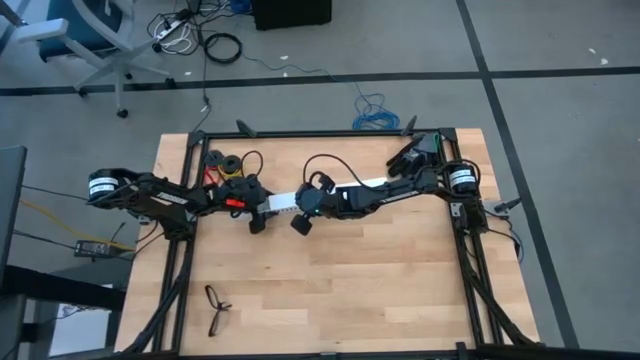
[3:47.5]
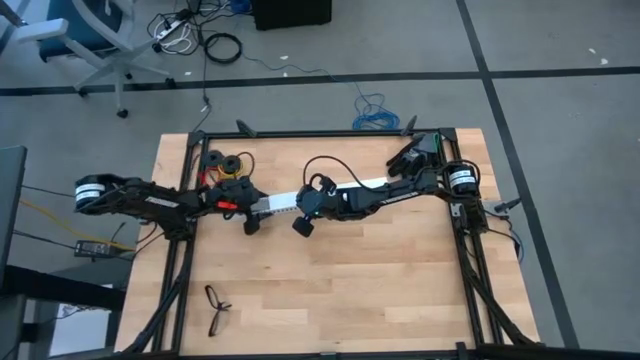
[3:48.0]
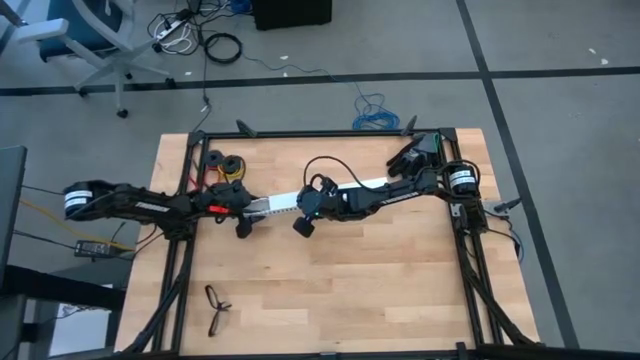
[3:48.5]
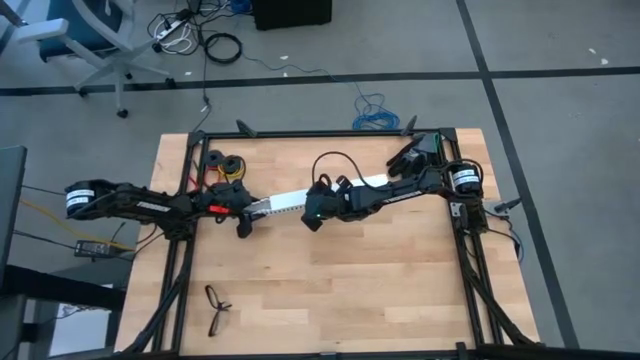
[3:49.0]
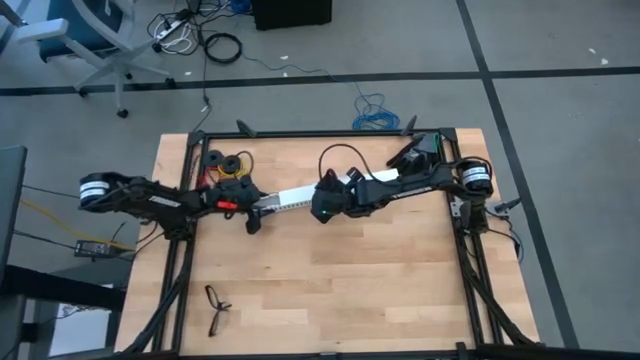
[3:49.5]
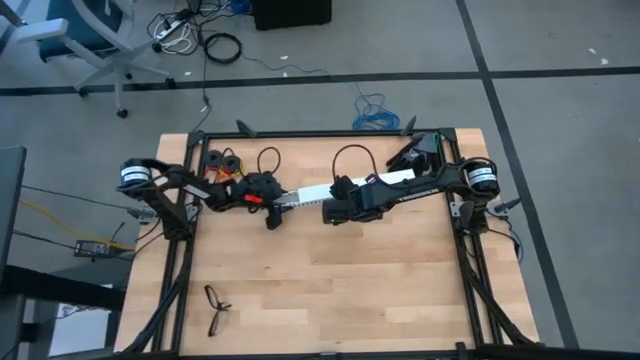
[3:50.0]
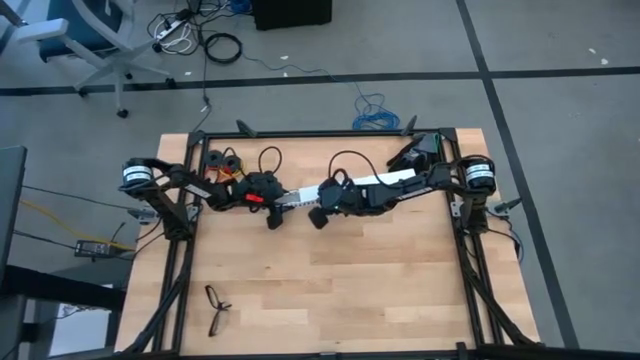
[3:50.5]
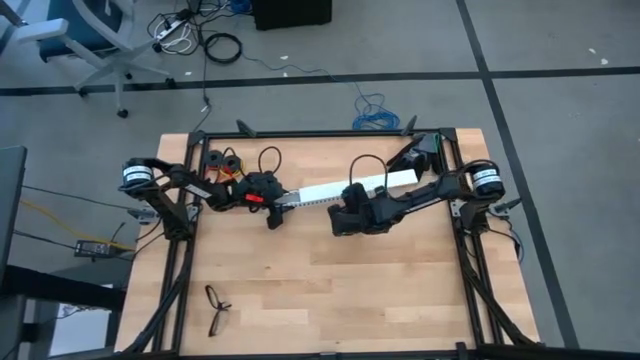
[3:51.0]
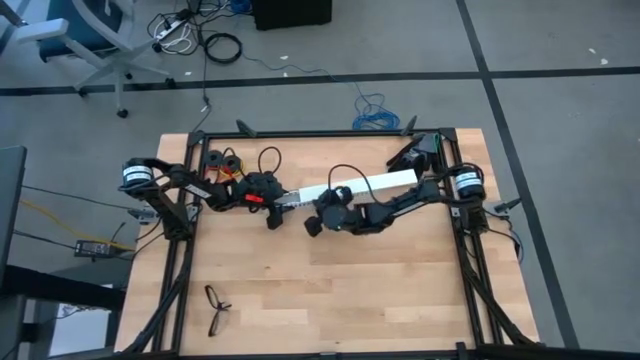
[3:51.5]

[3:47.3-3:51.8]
Task: Ziptie cables
Close the white cable duct

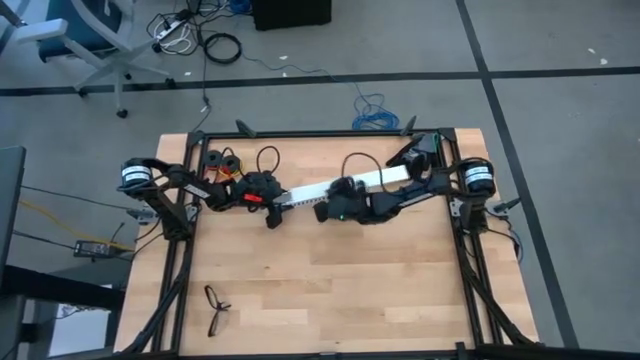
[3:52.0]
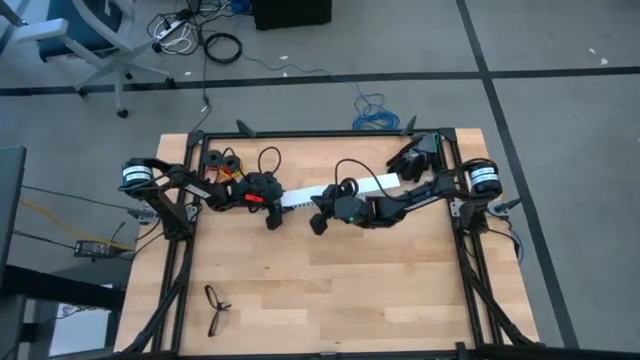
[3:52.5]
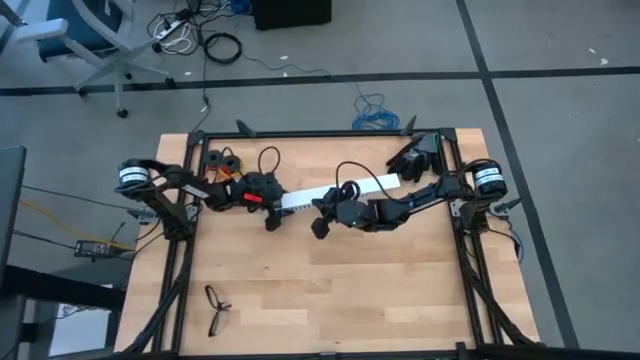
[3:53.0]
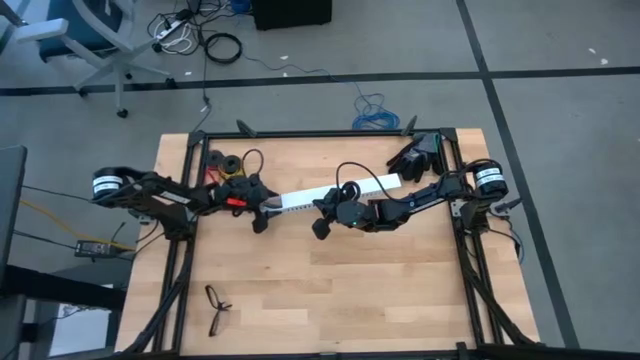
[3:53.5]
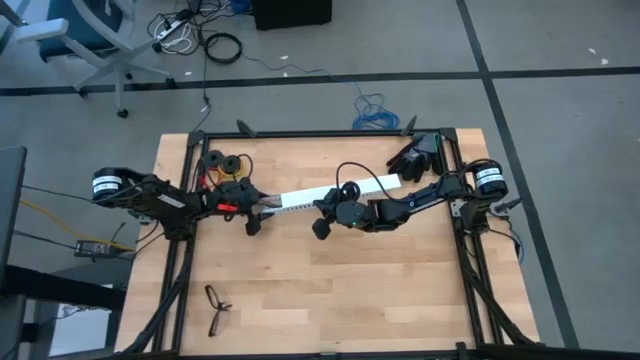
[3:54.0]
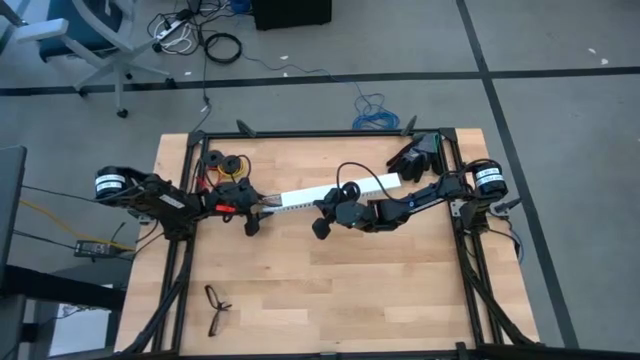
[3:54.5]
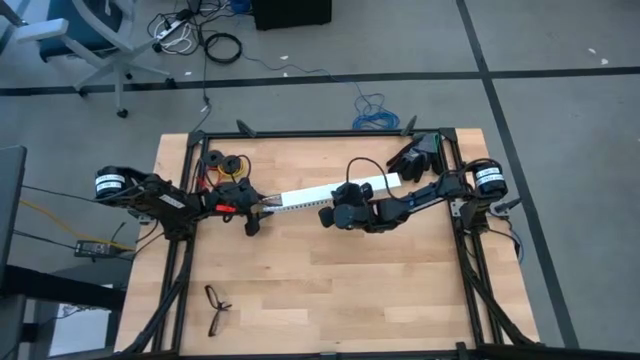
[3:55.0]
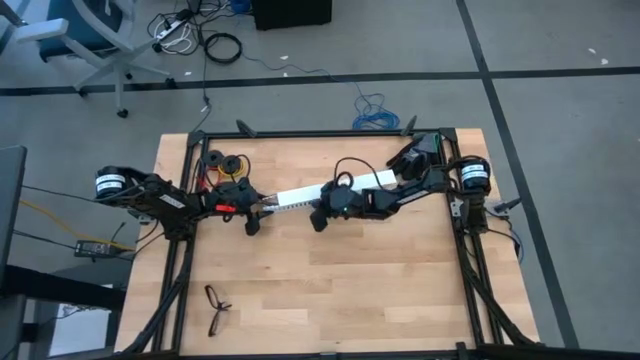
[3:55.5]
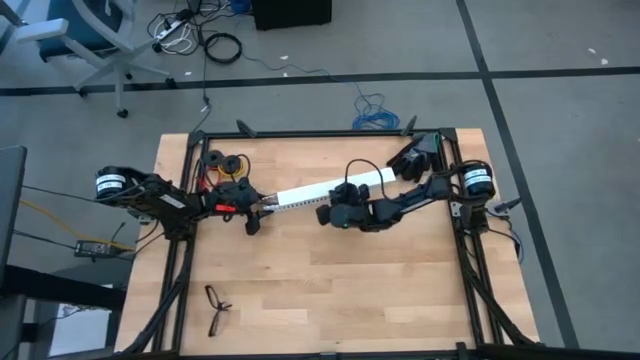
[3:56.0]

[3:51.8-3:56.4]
Close the white cable duct

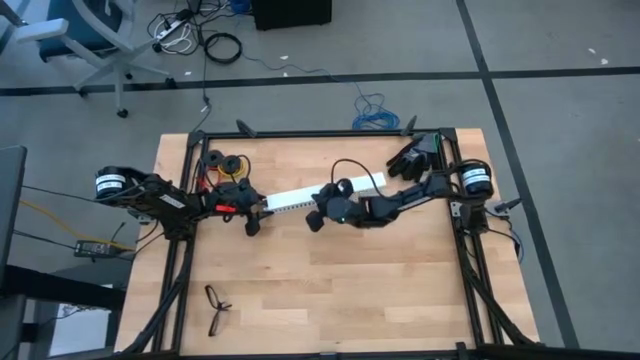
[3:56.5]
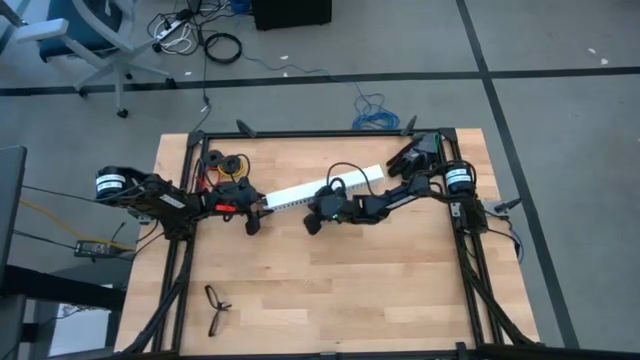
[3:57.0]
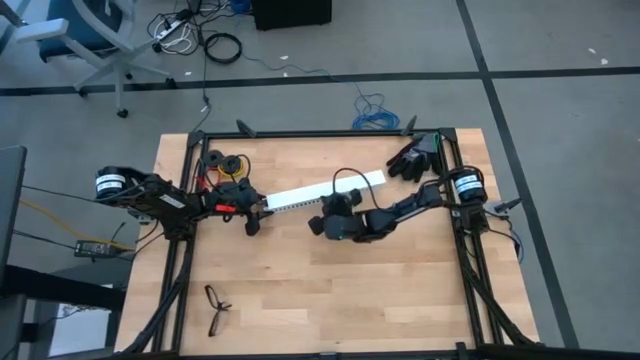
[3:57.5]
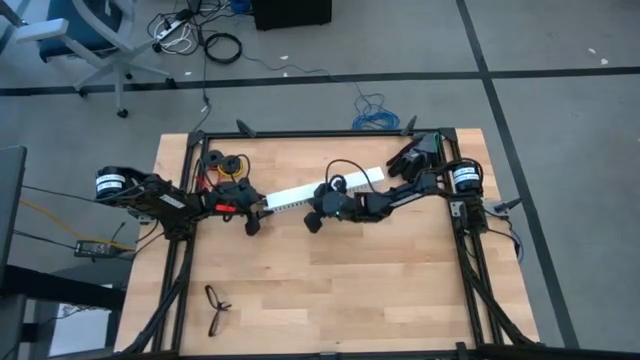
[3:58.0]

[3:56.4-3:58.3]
Close the white cable duct

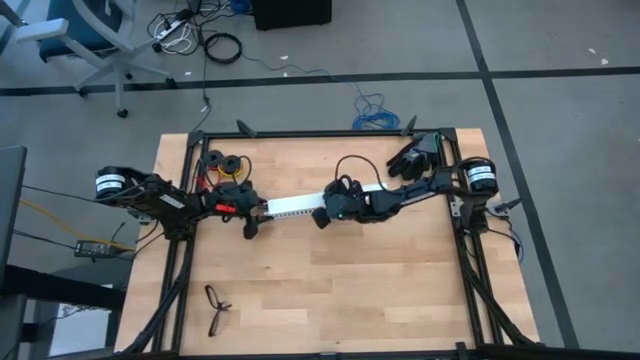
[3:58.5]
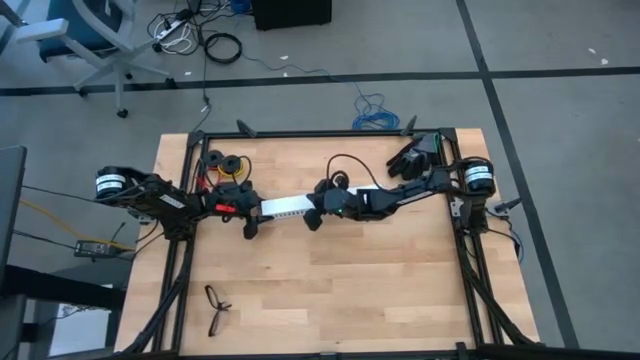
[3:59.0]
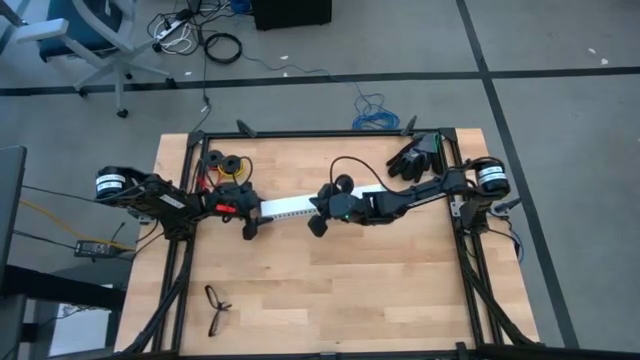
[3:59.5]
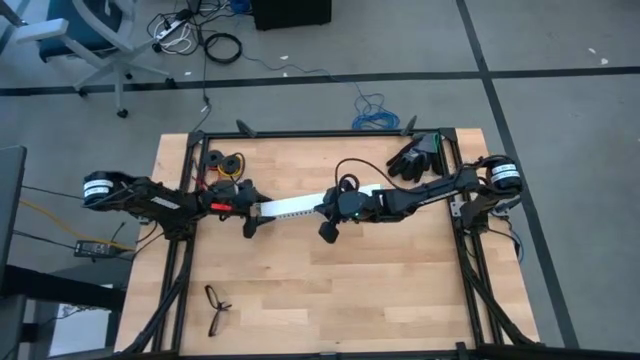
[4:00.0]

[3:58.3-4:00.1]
Close the white cable duct

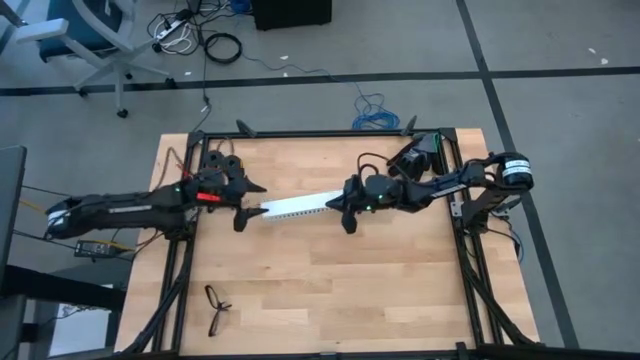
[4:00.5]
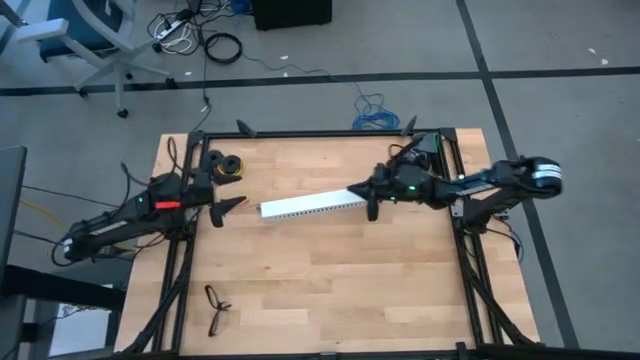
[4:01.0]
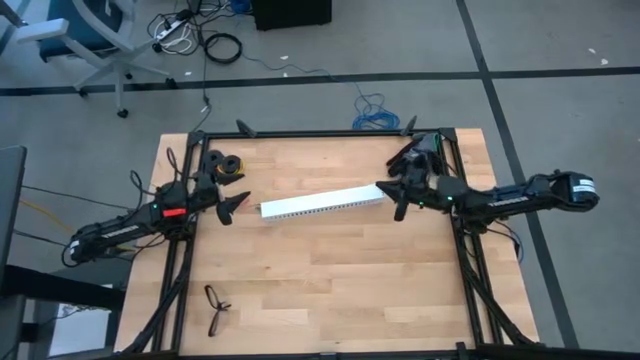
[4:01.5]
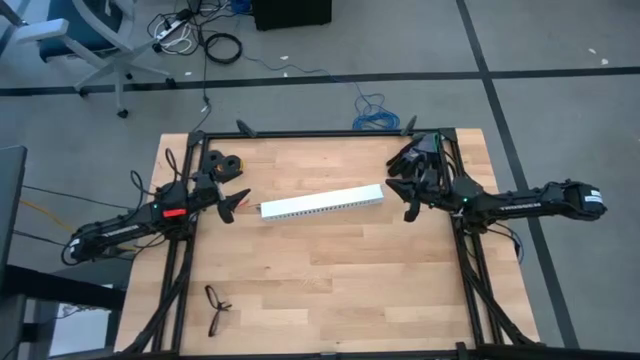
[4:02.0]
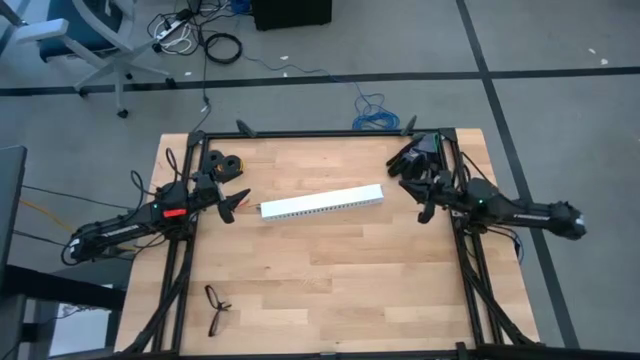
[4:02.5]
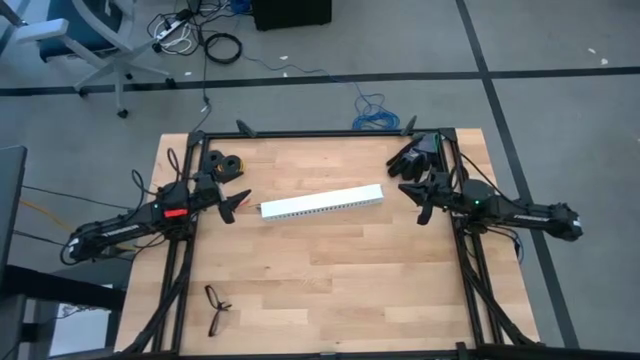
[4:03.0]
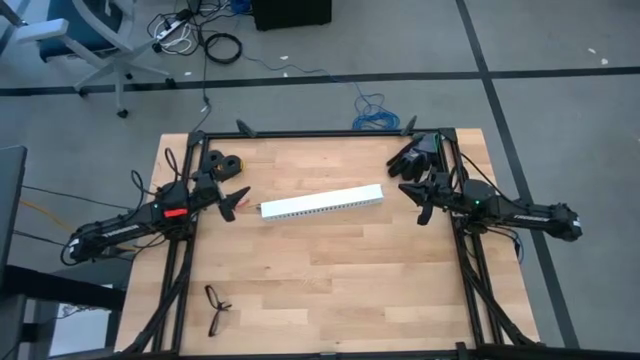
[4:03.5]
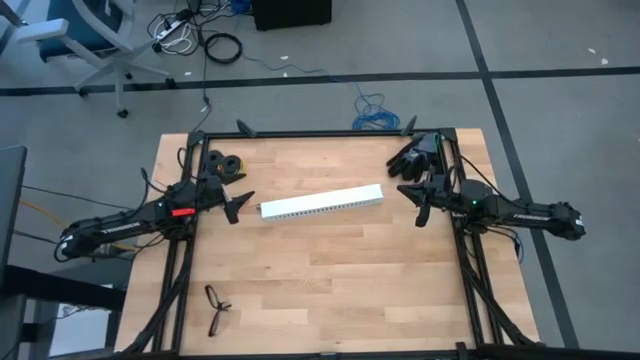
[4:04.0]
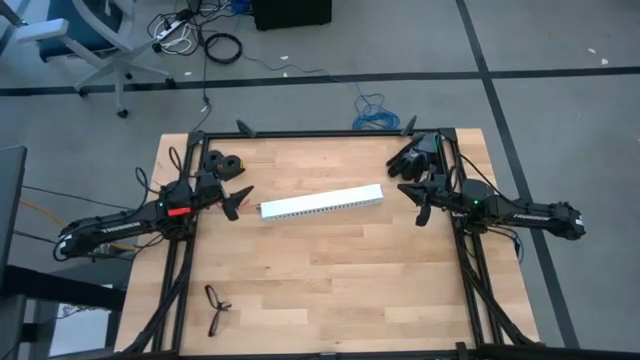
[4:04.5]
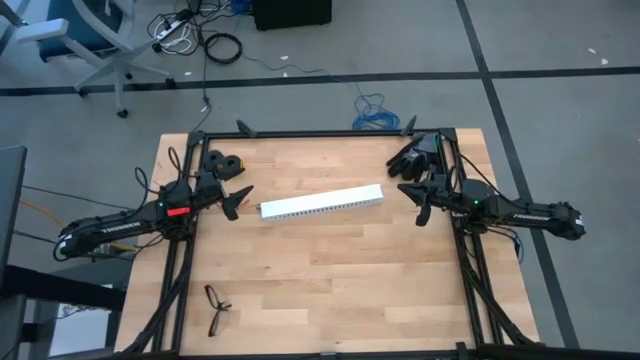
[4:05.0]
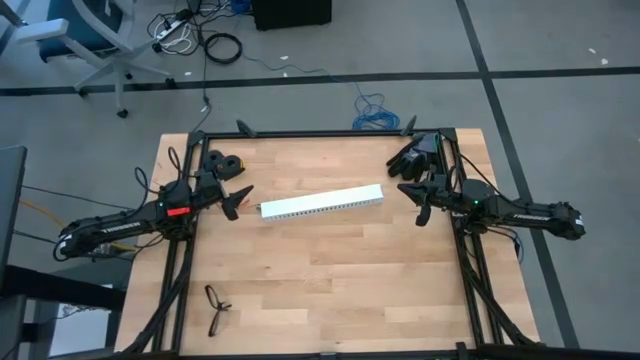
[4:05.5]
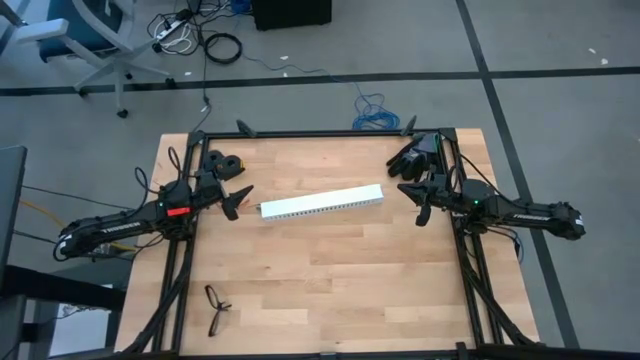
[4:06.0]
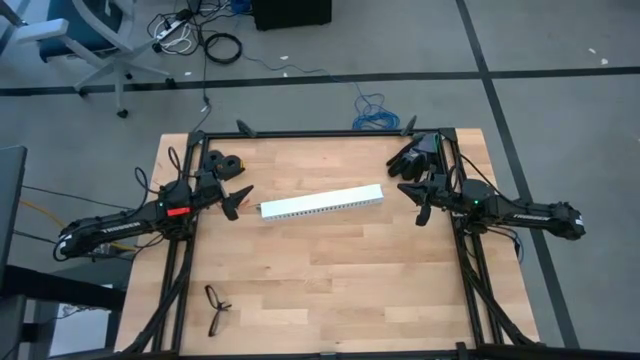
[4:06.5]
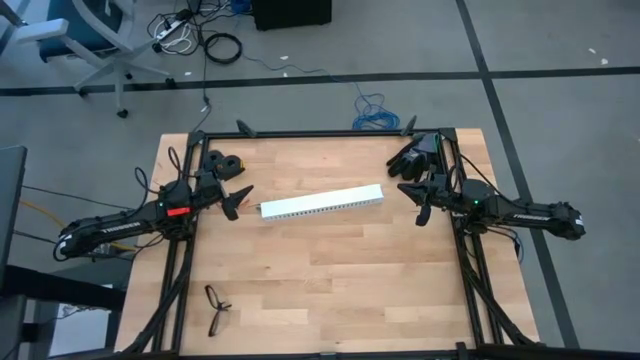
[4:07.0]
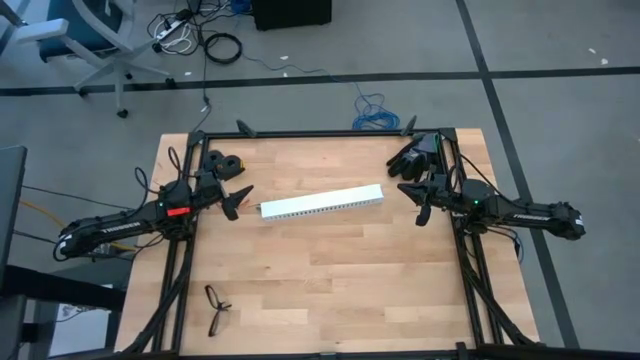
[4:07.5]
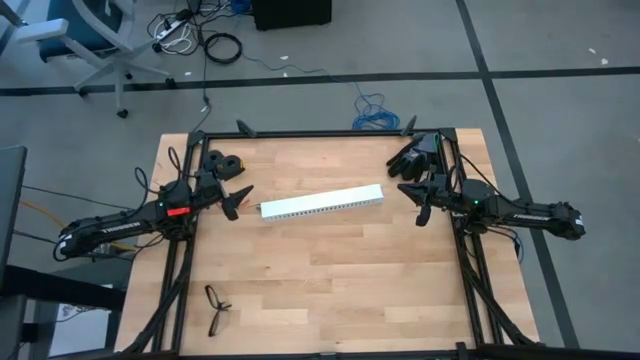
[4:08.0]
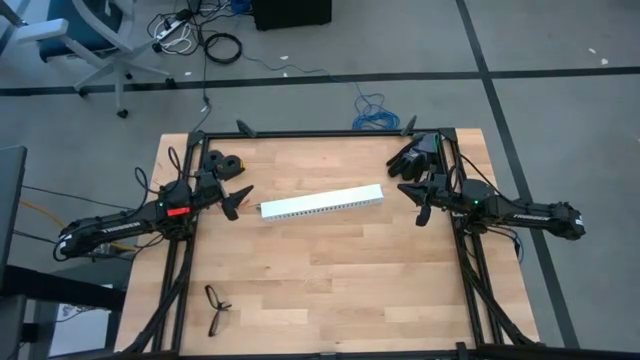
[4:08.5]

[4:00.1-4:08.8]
Return to Home Position
